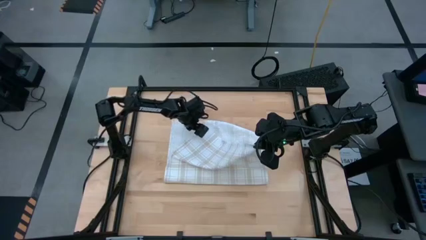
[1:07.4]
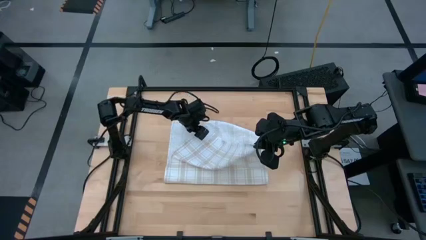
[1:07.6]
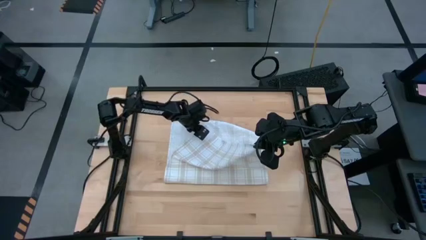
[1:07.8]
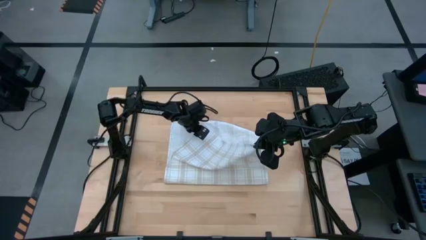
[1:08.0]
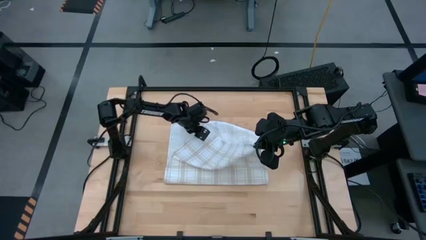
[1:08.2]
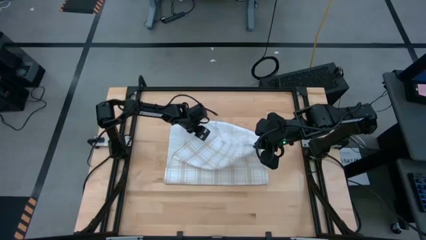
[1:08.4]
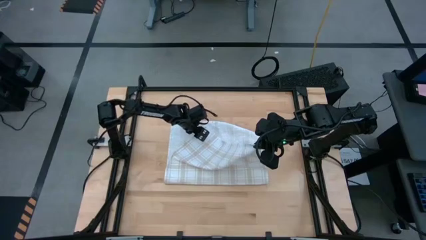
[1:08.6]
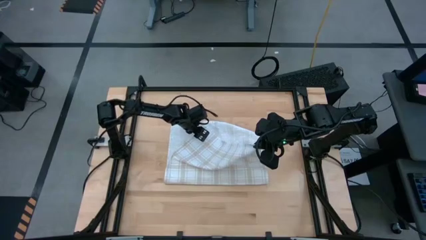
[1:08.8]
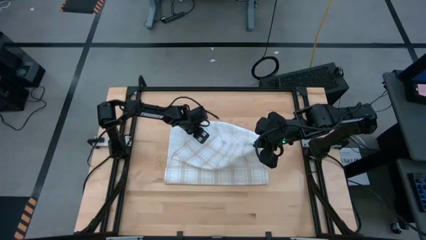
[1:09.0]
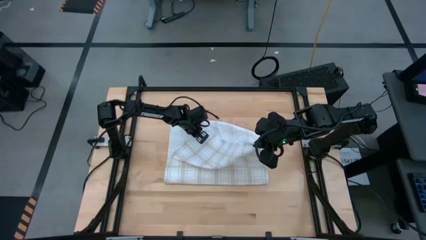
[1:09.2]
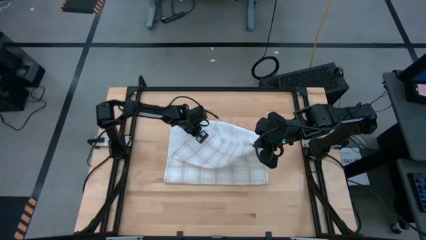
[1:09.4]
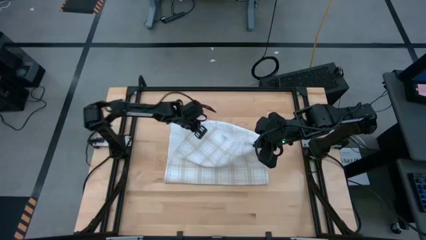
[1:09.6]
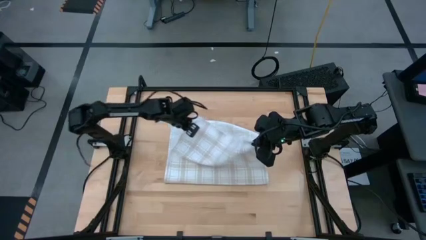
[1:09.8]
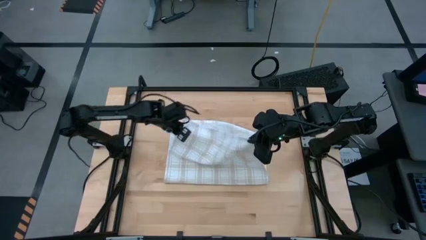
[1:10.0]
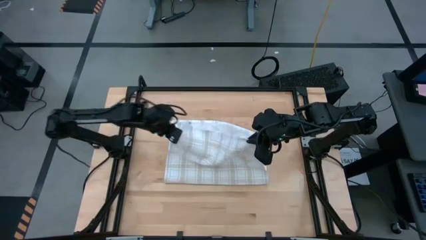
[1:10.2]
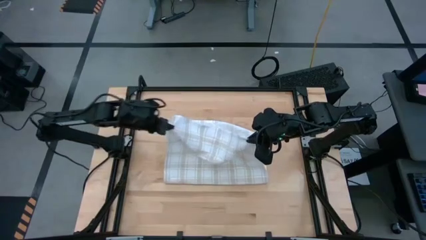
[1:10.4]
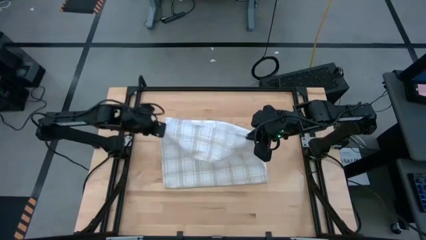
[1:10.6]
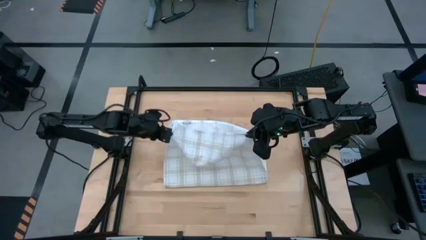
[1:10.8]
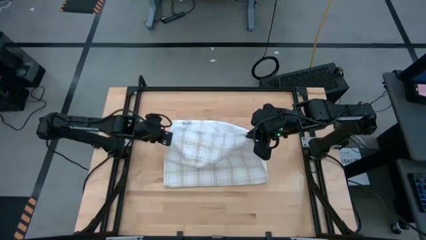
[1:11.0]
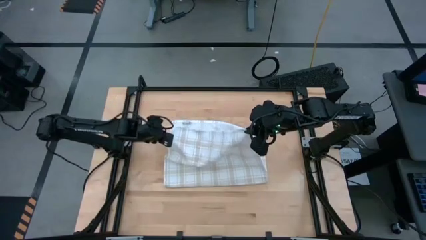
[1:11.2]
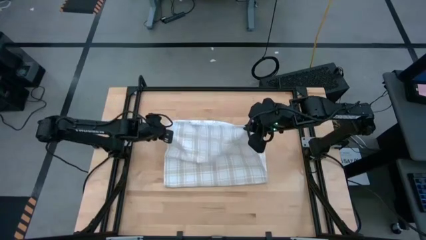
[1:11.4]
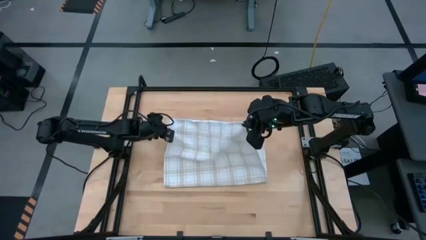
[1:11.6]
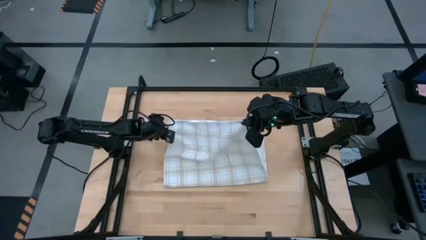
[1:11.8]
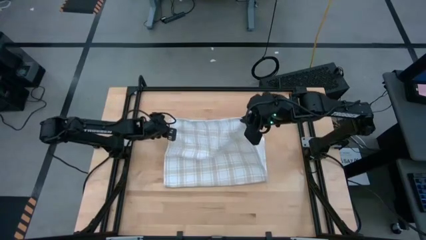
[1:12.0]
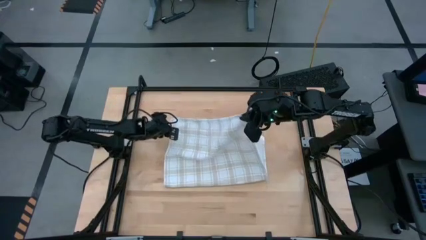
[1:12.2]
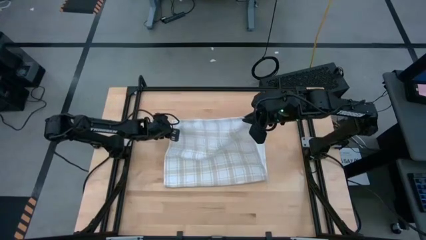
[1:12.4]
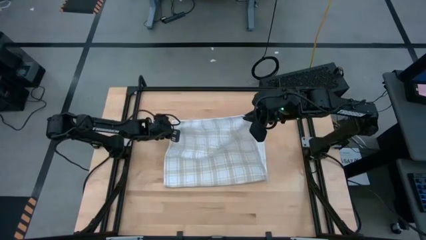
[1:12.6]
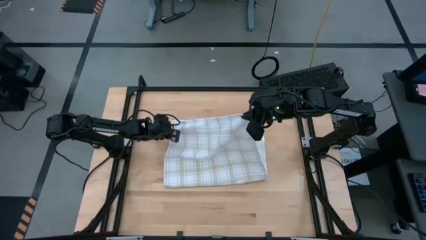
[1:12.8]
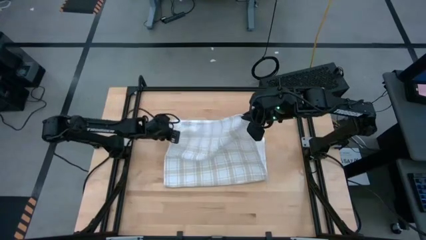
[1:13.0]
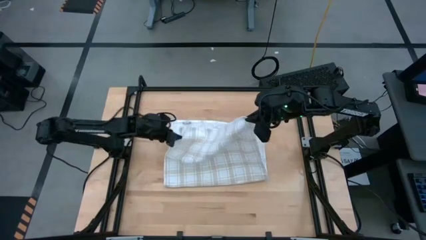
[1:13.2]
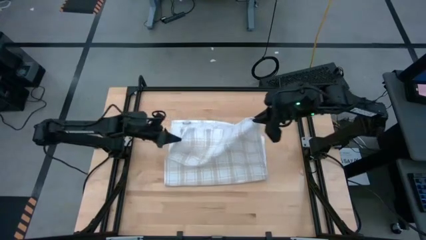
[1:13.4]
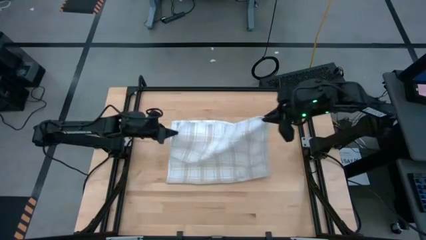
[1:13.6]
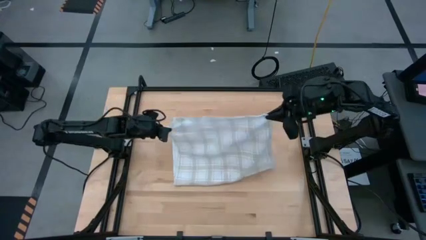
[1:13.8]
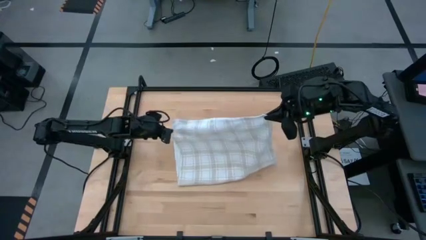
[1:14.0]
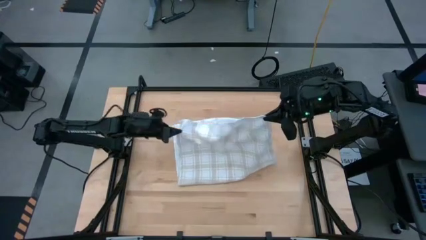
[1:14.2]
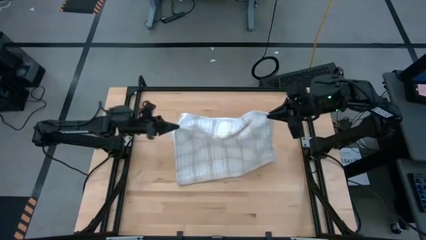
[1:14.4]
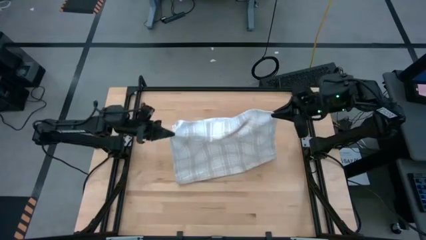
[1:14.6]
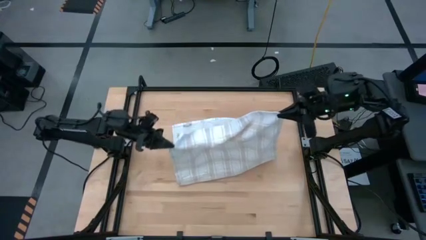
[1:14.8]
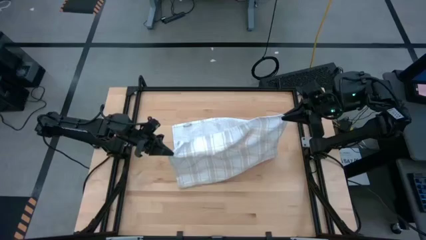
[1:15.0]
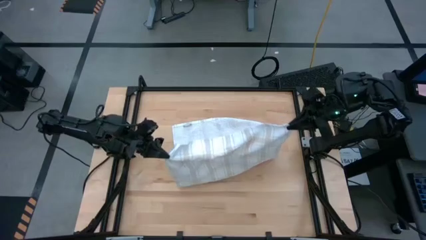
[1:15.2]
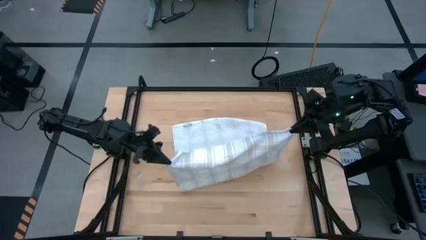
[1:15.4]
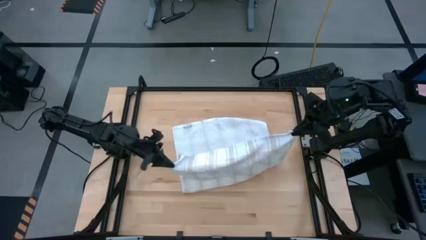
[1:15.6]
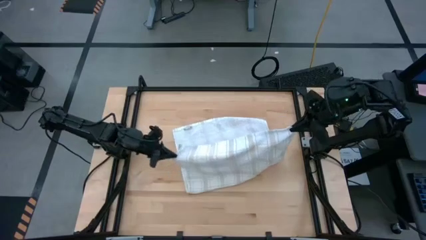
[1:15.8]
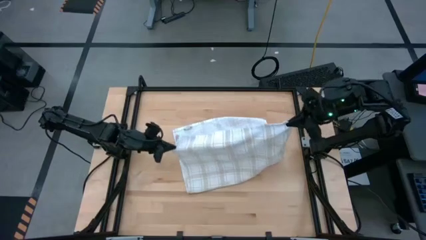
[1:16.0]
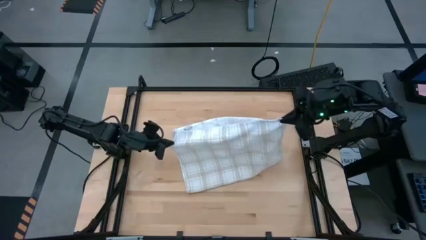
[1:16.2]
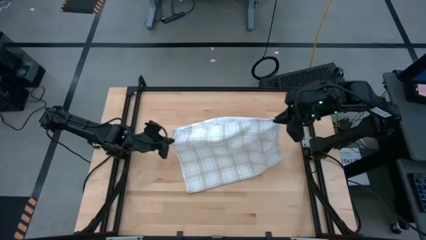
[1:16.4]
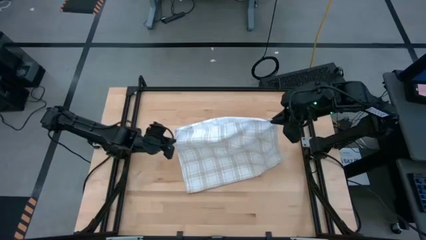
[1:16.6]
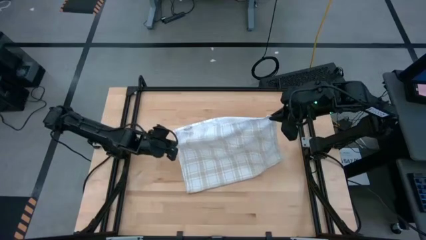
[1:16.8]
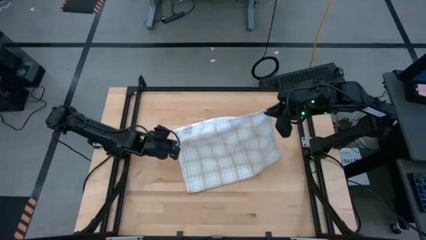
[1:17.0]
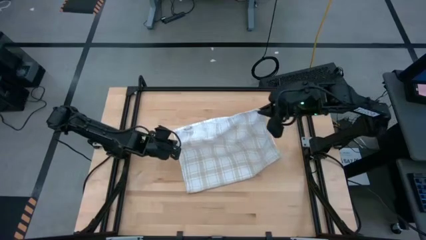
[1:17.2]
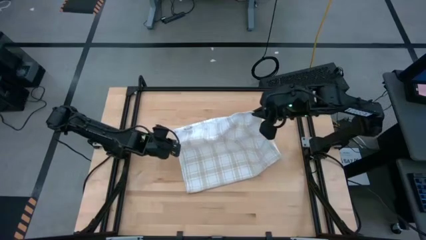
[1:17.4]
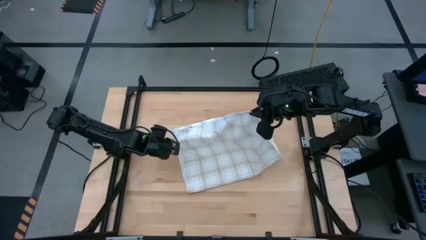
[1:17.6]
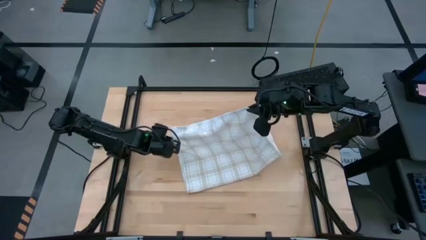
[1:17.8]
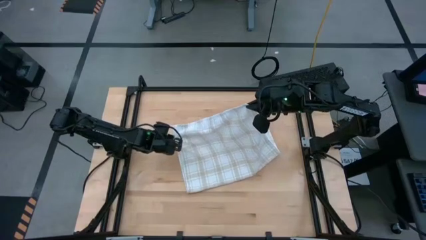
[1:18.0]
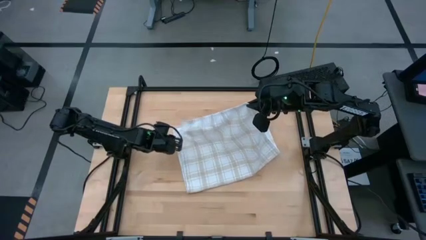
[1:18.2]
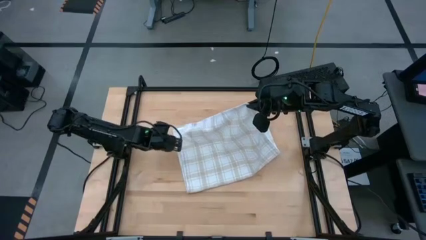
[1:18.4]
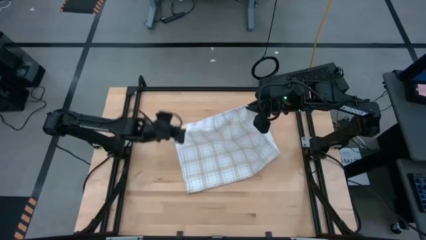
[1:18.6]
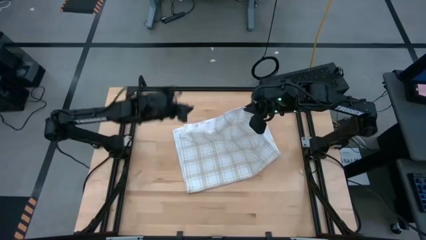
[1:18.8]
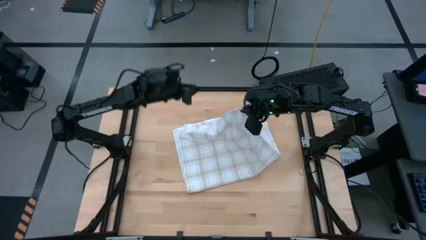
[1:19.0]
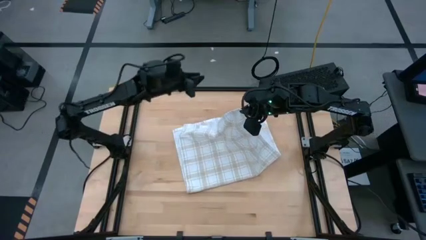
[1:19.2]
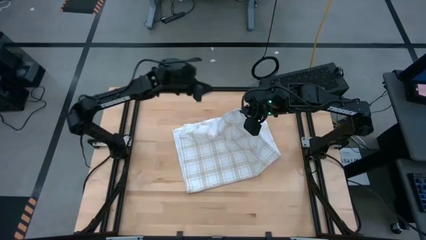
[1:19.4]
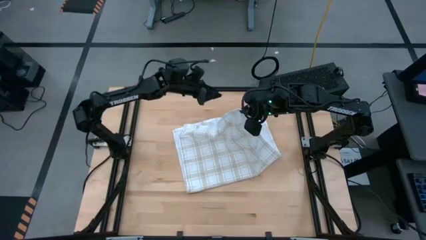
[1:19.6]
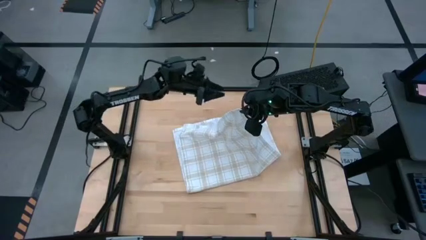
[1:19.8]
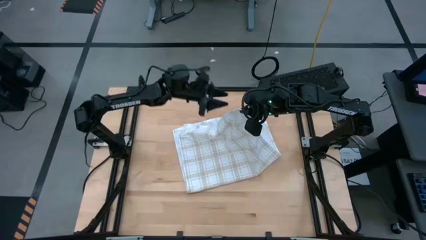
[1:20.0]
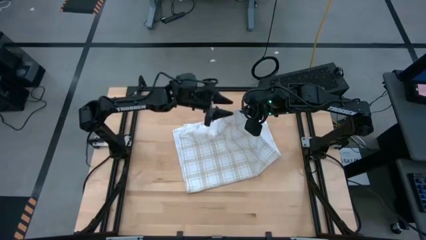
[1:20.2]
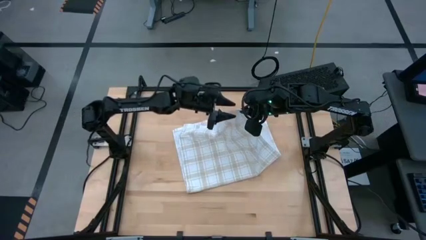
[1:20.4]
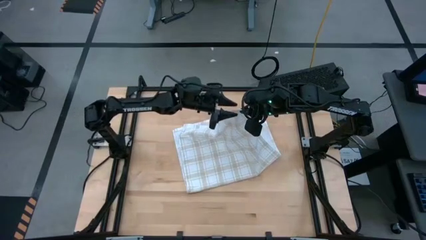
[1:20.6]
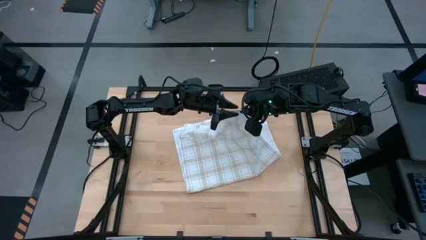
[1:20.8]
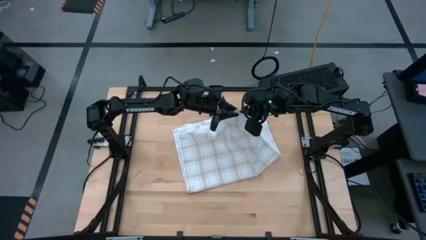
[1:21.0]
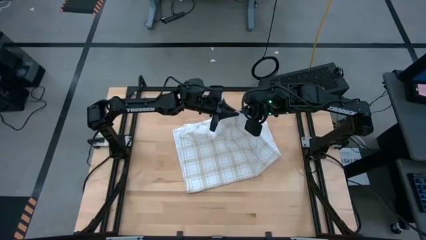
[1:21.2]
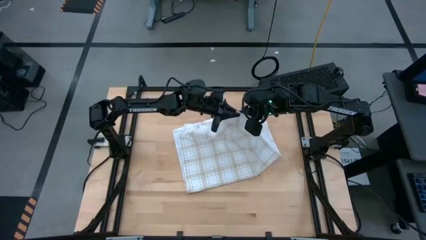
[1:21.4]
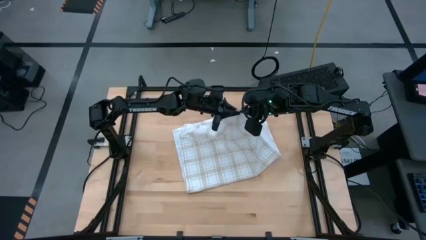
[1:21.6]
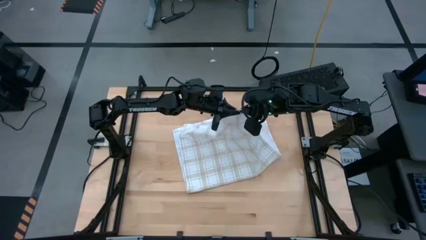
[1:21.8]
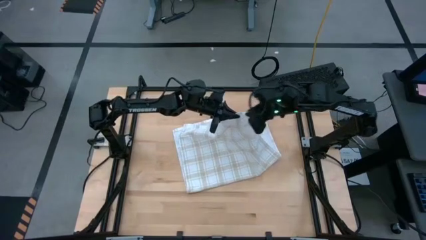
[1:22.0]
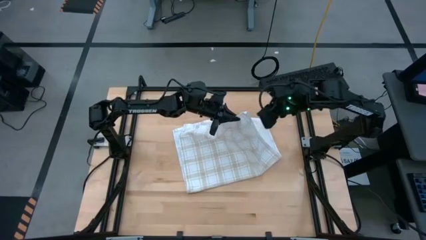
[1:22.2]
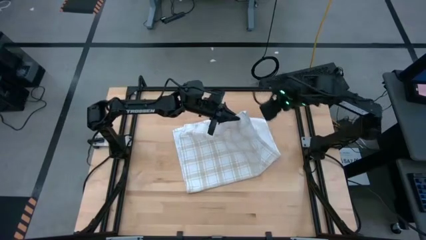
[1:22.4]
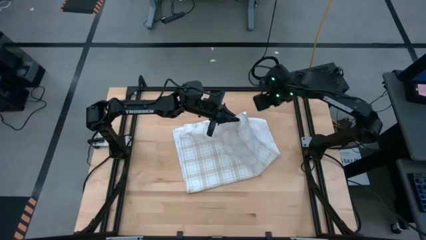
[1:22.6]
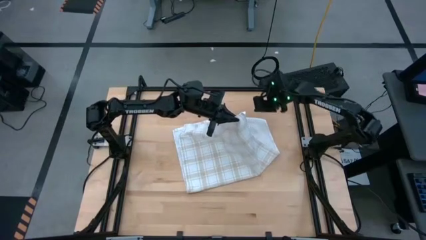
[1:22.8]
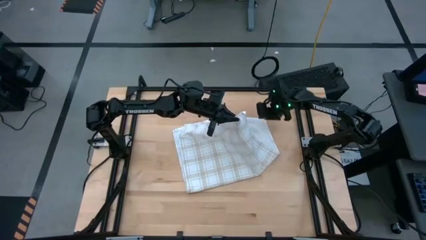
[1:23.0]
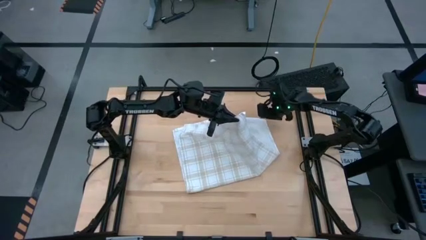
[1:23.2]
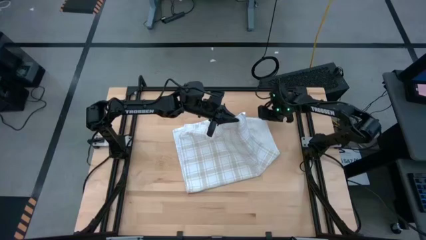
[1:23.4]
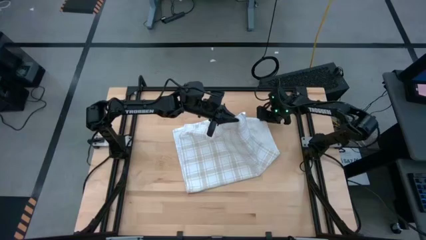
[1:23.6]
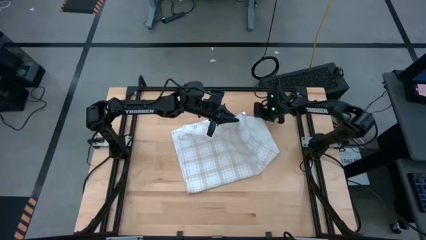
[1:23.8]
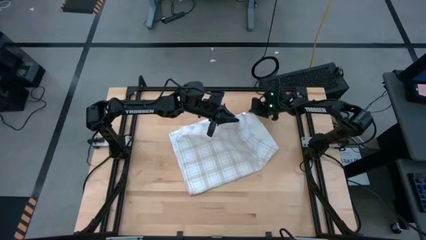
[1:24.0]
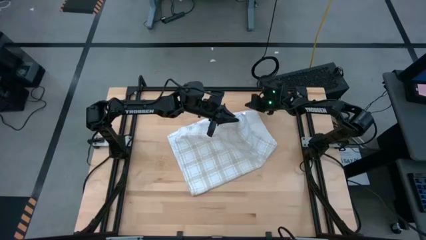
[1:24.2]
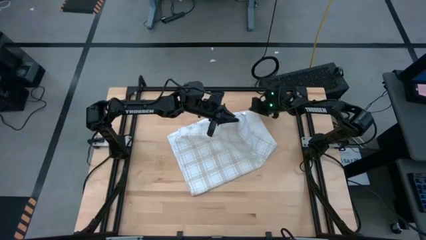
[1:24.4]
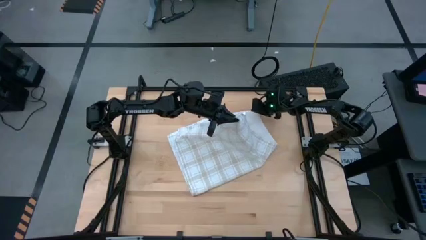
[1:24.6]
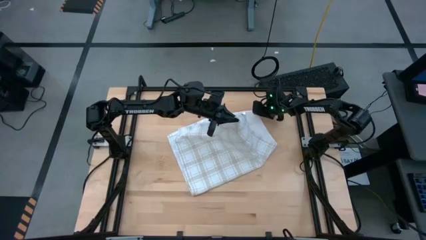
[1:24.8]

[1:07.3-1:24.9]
Task: Roll towel
Roll the towel
